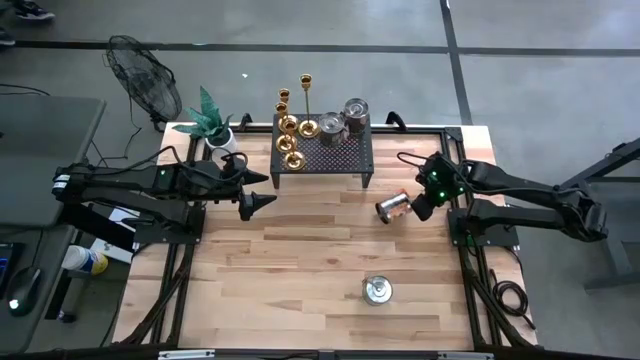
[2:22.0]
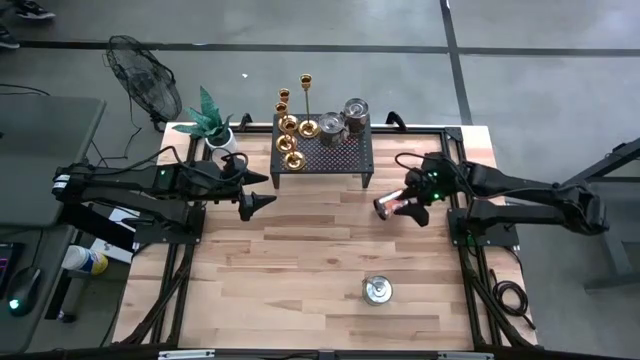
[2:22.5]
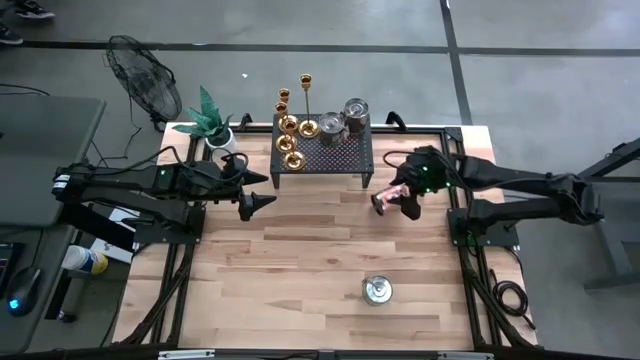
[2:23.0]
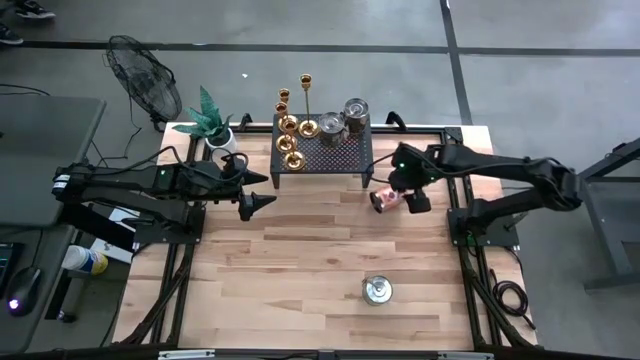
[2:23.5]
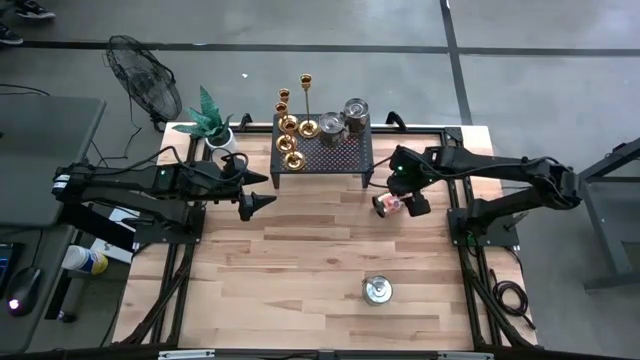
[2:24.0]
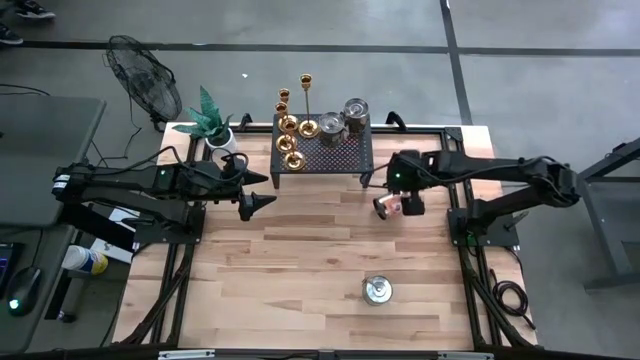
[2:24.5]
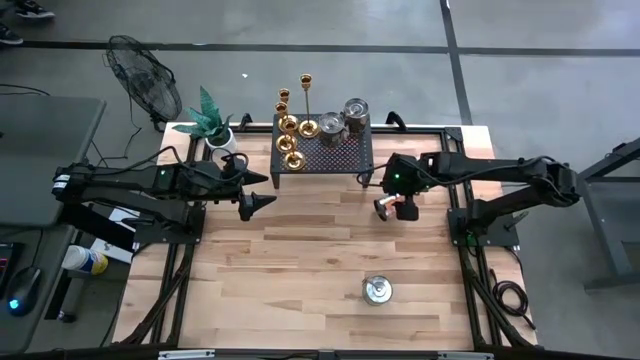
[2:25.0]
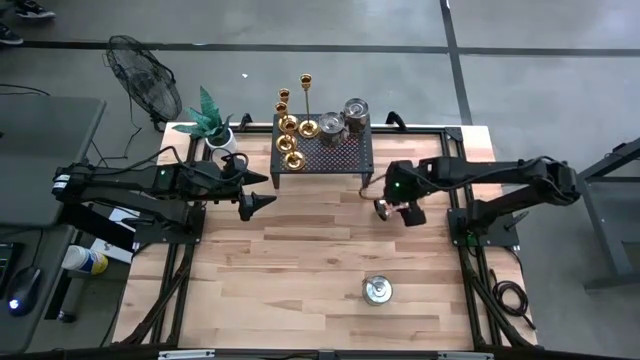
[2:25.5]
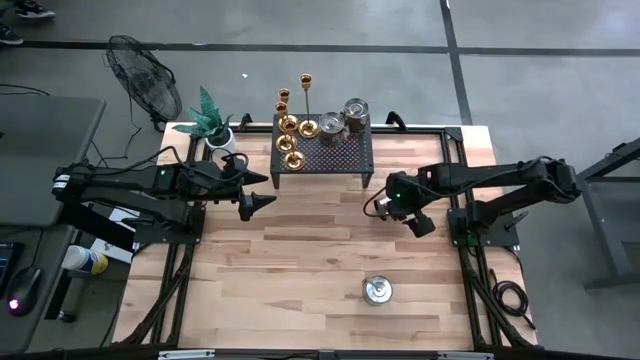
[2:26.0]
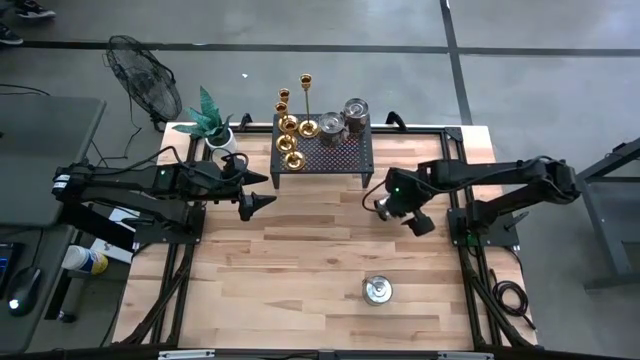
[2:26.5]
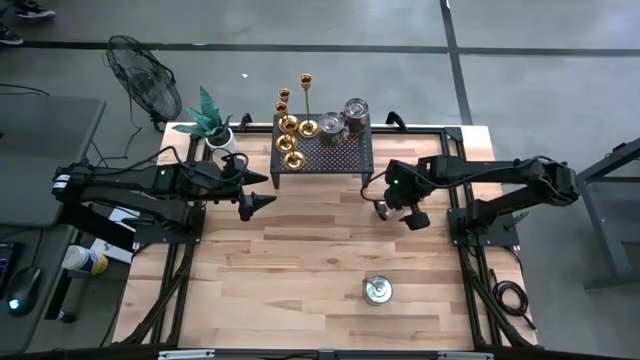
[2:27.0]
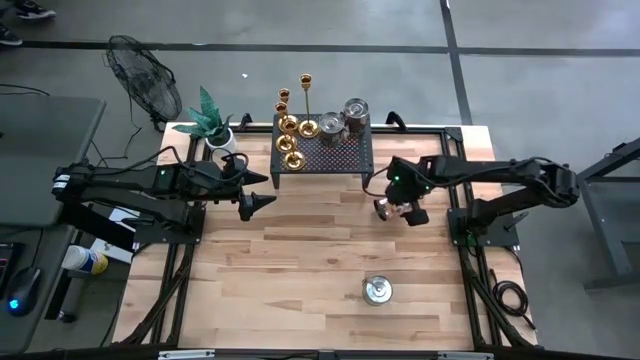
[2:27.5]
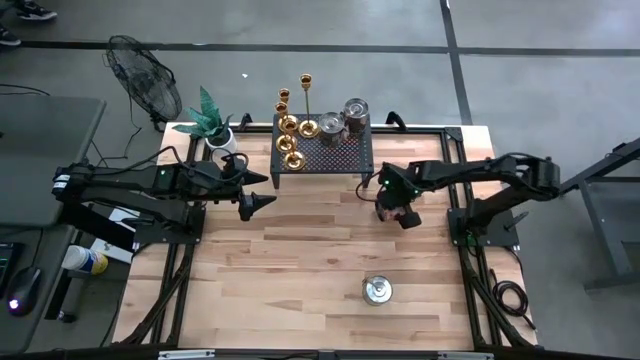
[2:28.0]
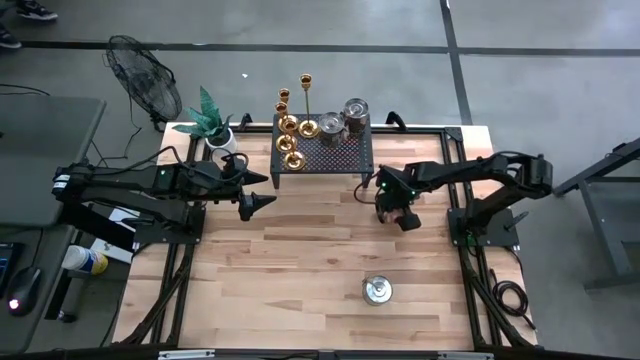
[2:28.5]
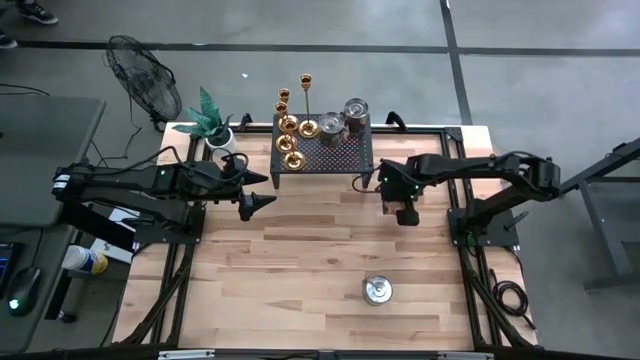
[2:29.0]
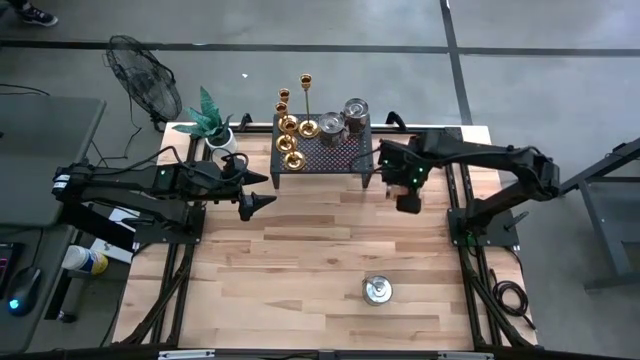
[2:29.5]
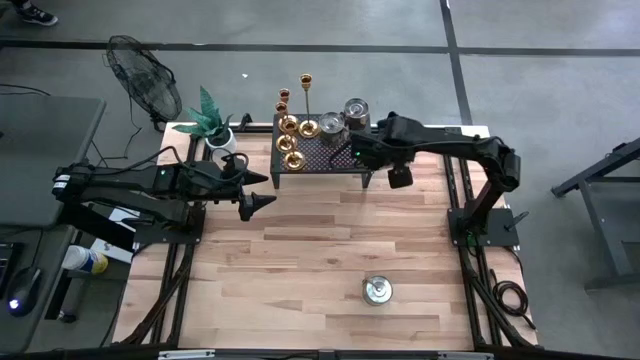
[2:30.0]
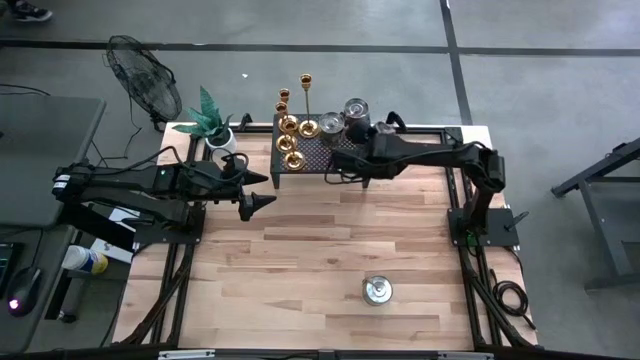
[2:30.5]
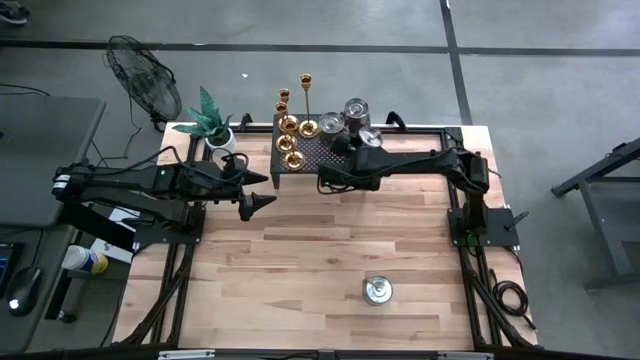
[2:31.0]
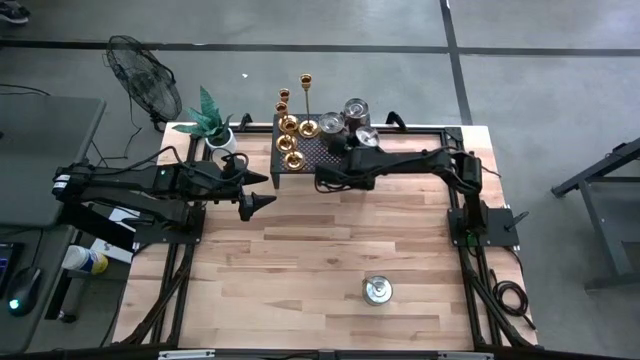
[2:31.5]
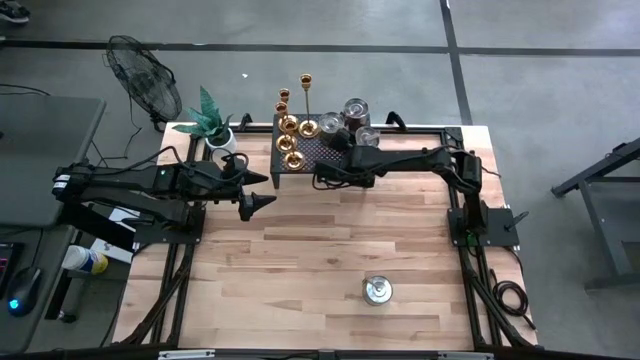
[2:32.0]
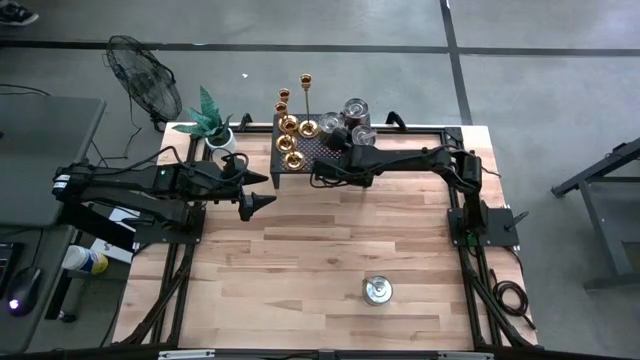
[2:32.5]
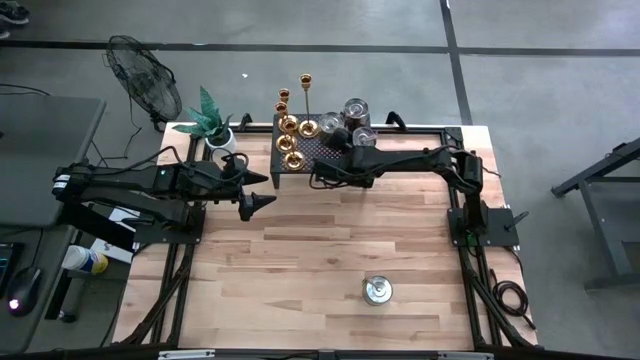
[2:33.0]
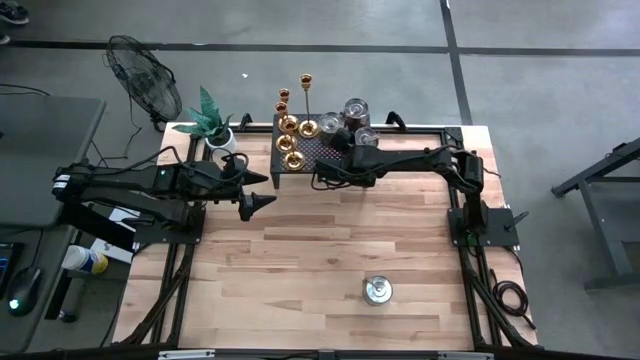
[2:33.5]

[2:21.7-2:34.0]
Task: Pick & Place candle stick holders
Put the orange scented candle on the shelf

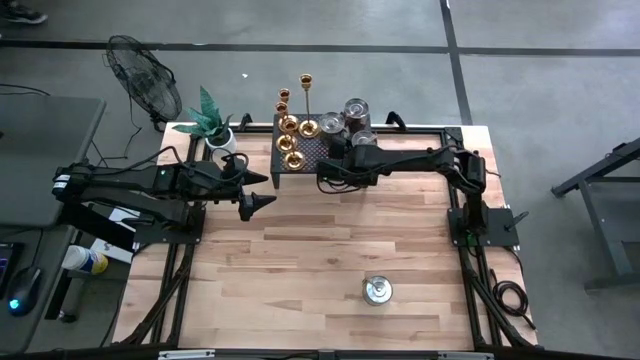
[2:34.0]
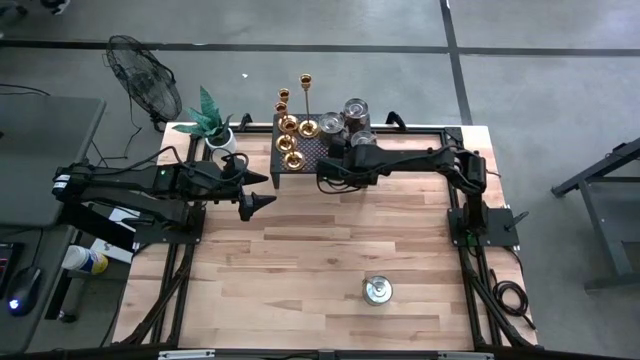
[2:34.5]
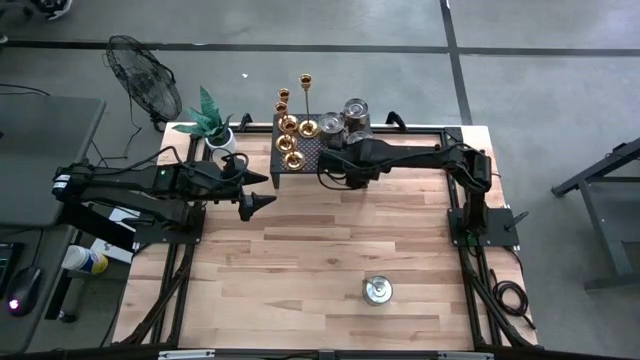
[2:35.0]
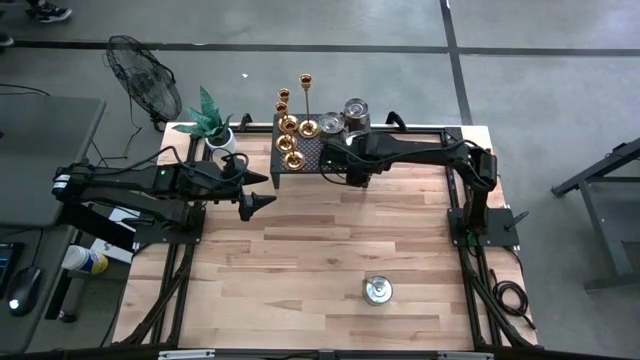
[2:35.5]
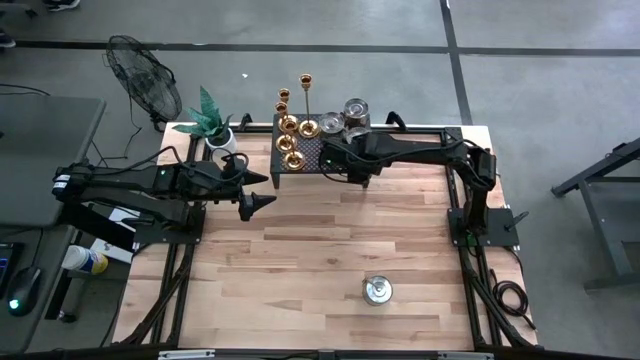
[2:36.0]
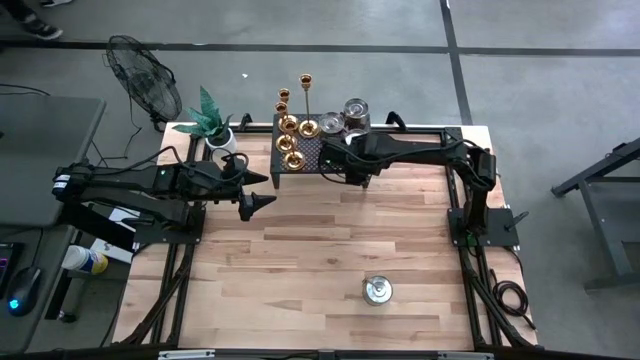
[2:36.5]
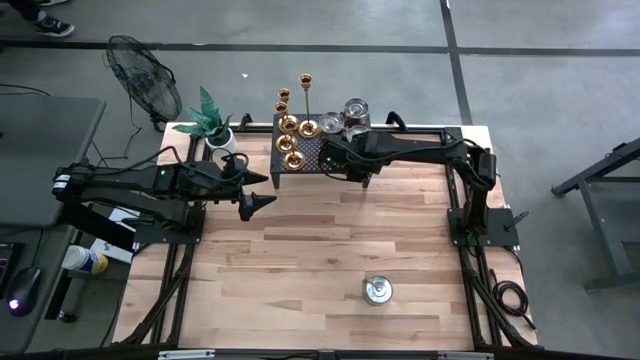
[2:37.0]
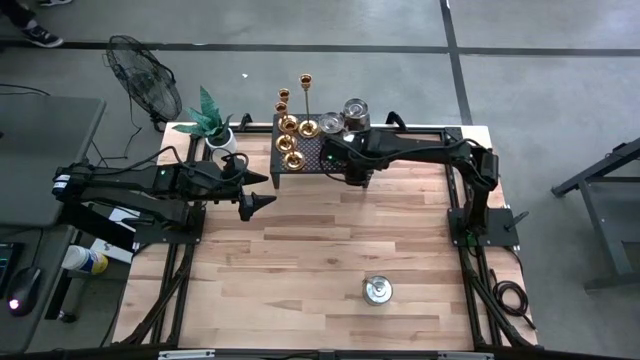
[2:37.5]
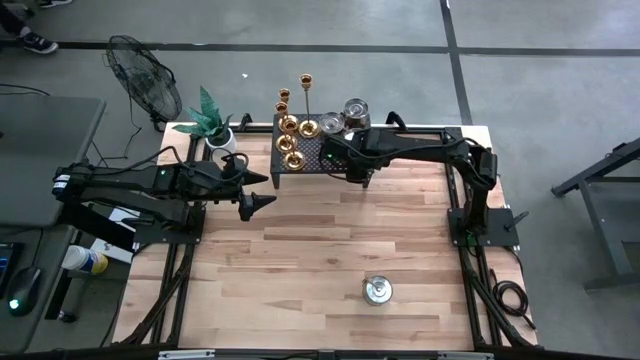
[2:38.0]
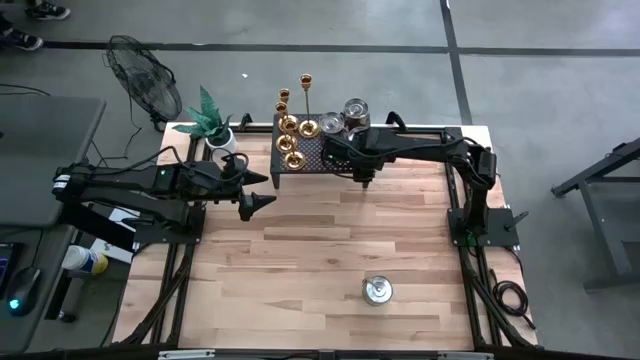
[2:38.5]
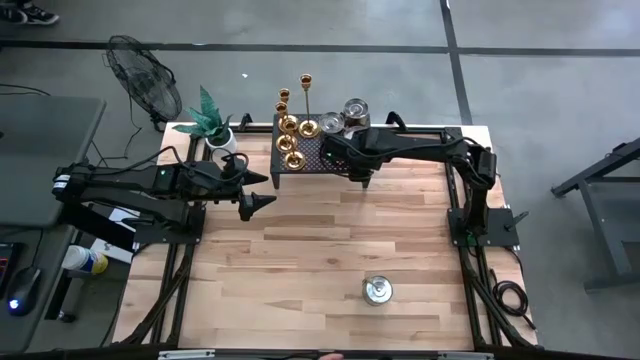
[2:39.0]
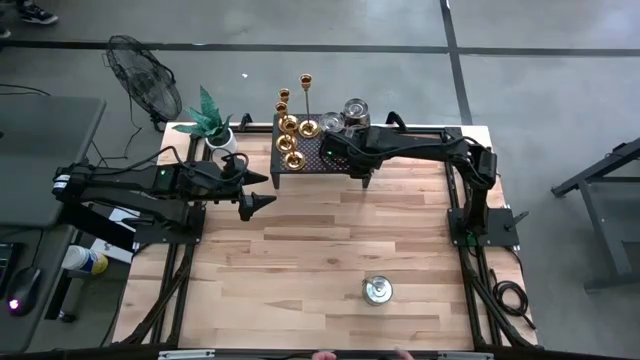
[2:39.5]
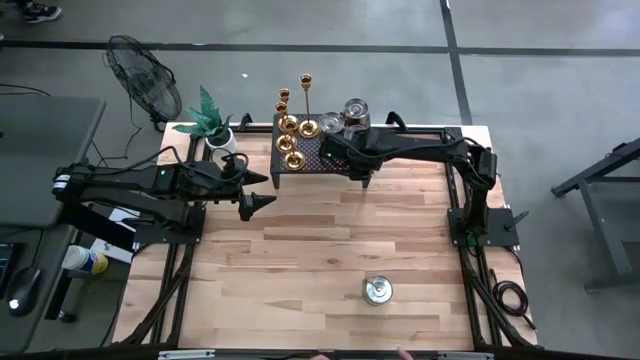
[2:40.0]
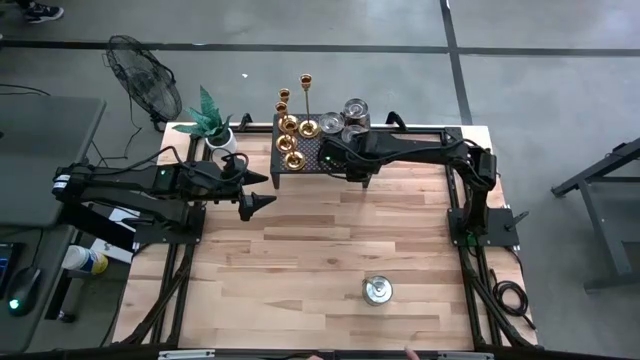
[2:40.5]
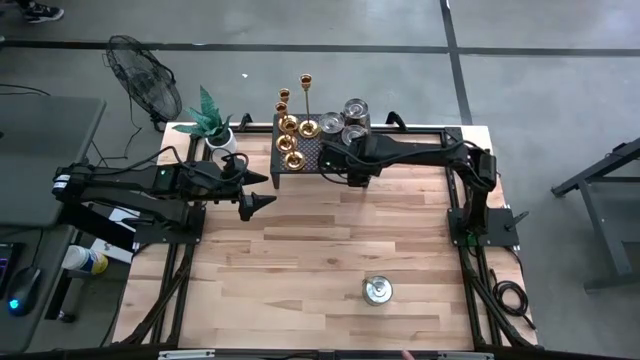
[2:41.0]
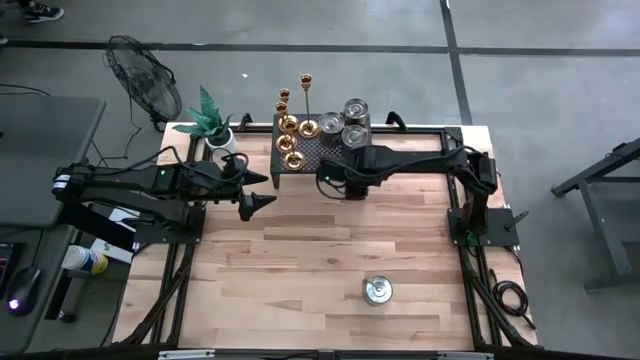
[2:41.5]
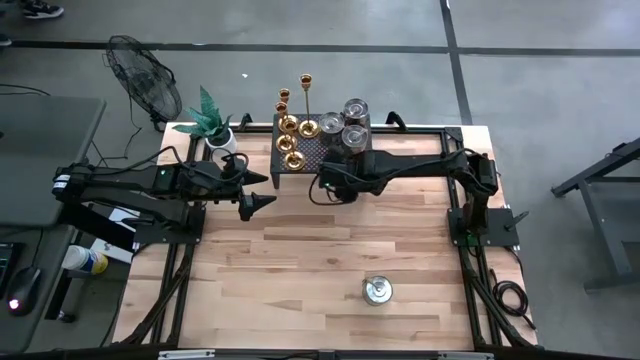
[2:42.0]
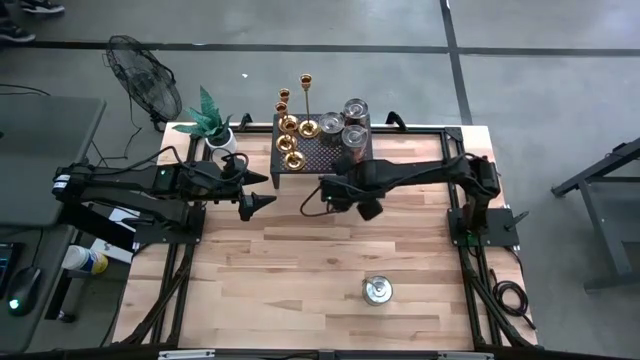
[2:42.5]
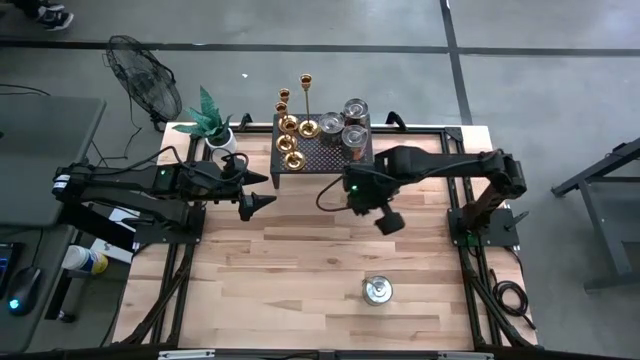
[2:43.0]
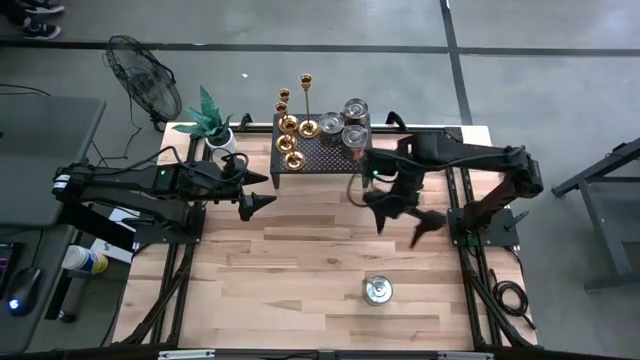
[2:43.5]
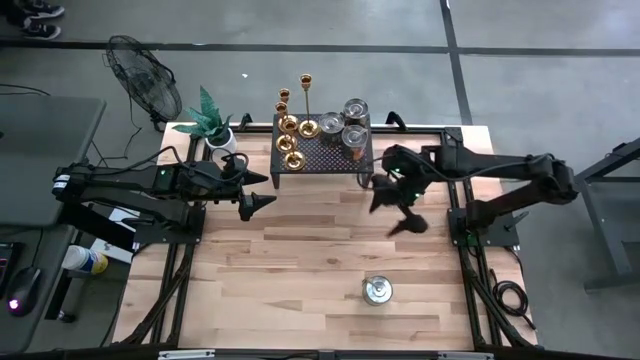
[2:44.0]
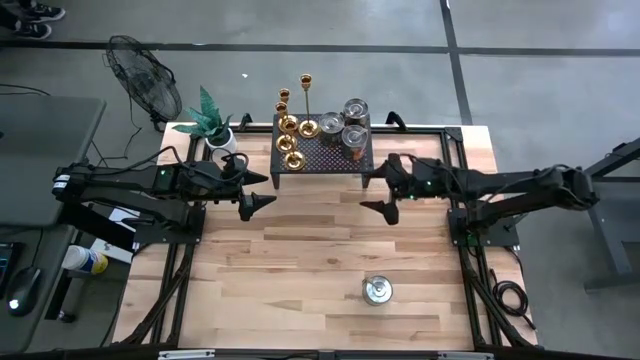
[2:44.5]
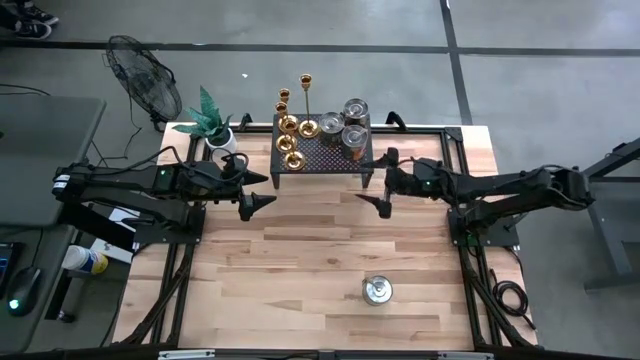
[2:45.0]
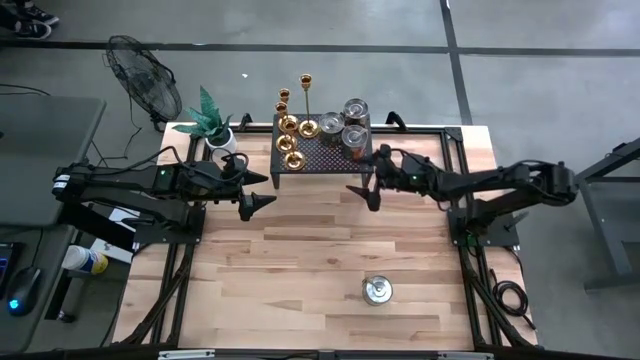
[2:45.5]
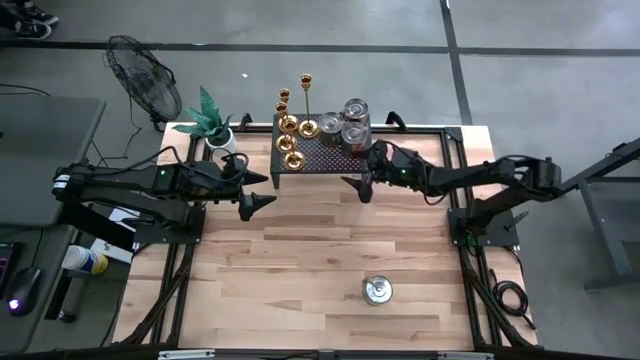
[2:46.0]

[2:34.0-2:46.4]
Put the orange scented candle on the shelf
